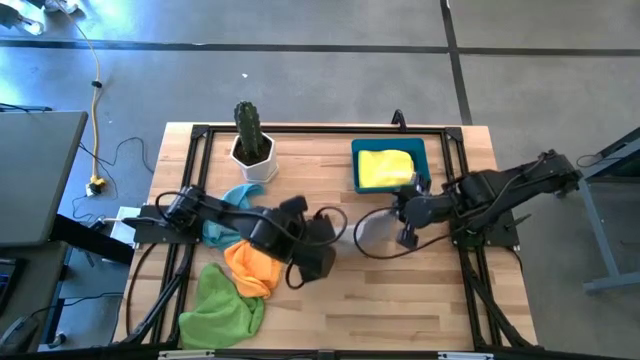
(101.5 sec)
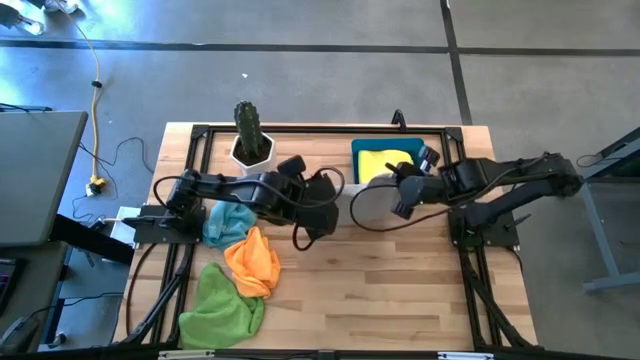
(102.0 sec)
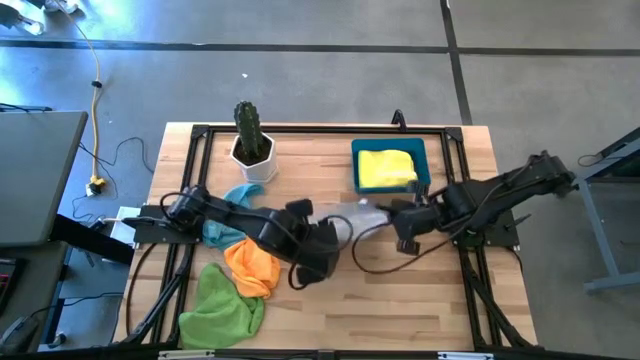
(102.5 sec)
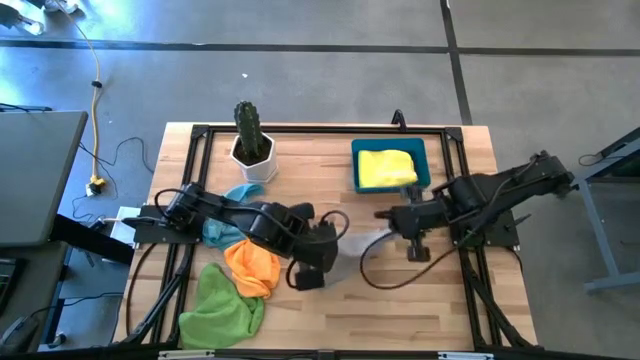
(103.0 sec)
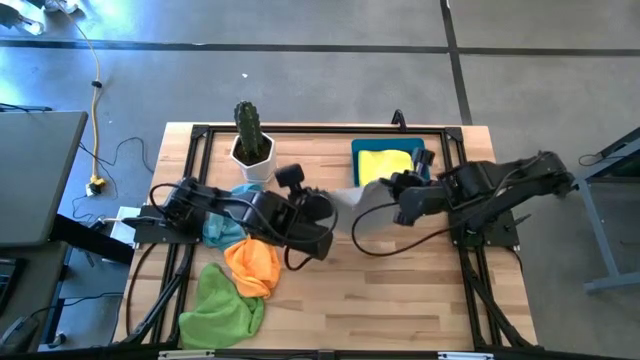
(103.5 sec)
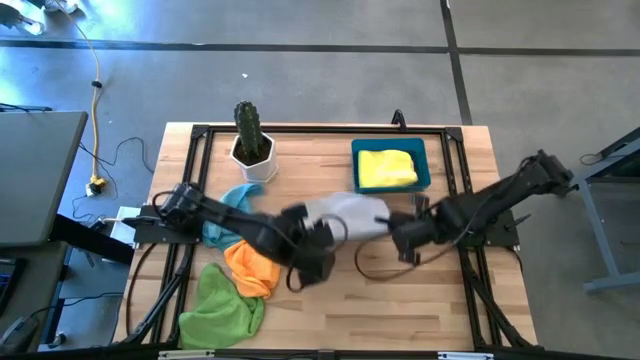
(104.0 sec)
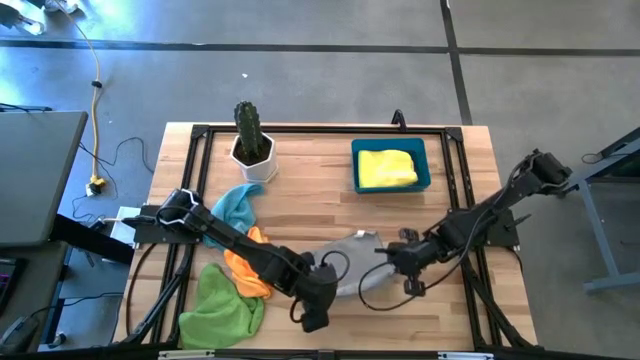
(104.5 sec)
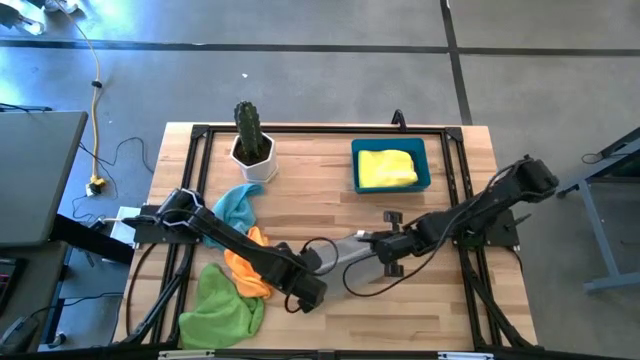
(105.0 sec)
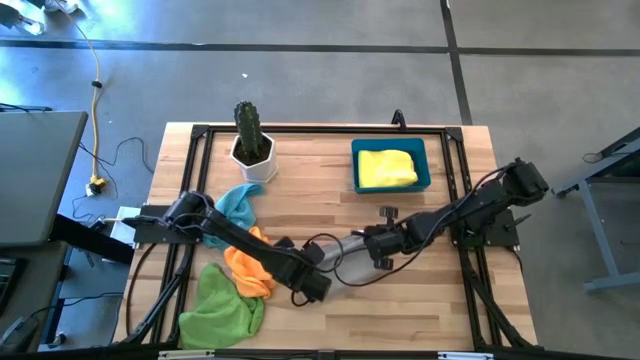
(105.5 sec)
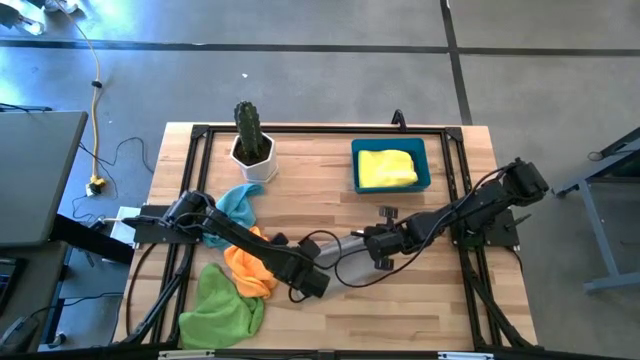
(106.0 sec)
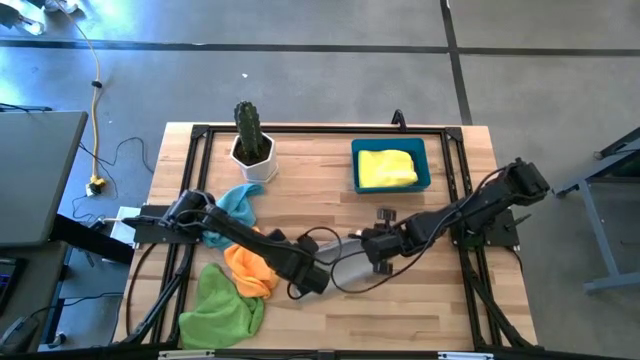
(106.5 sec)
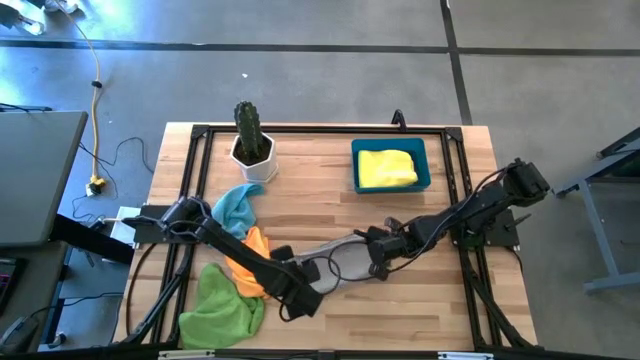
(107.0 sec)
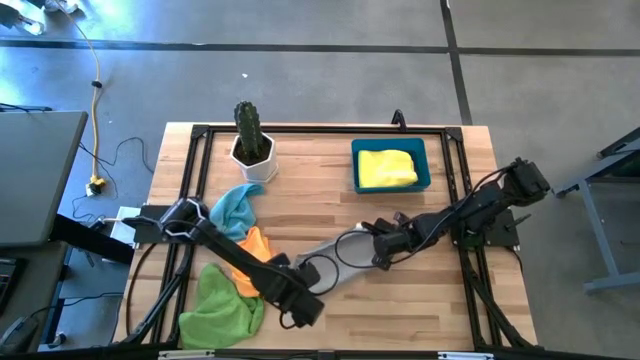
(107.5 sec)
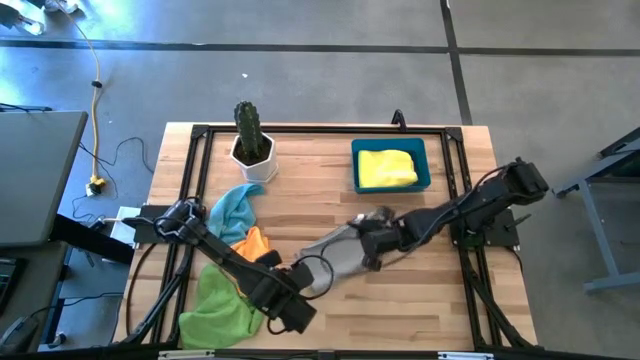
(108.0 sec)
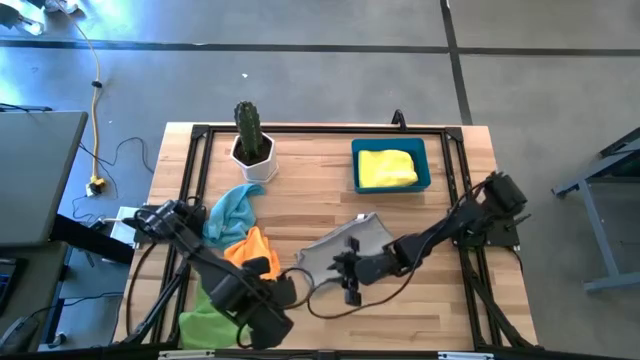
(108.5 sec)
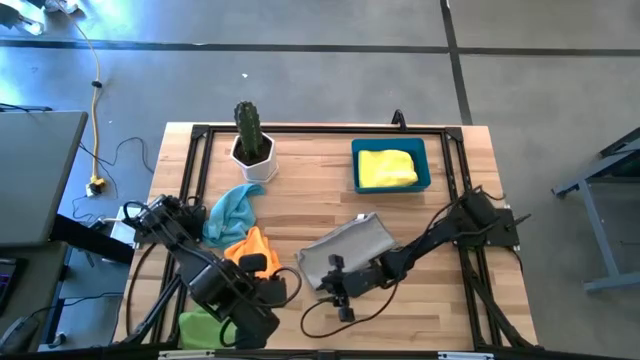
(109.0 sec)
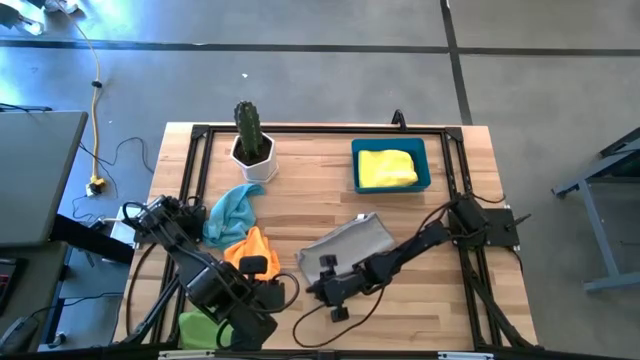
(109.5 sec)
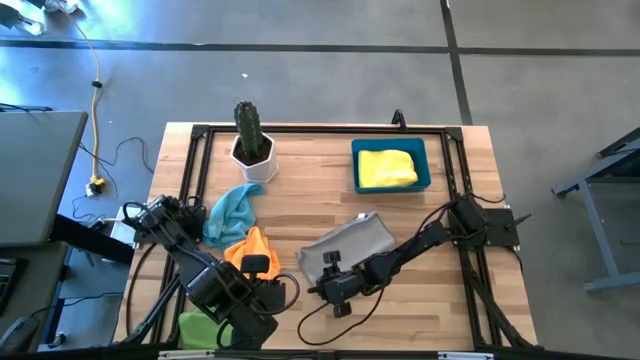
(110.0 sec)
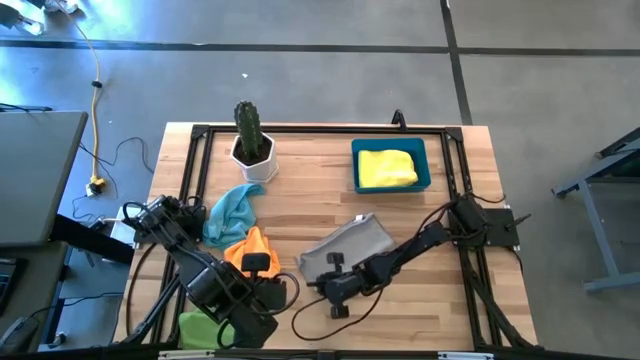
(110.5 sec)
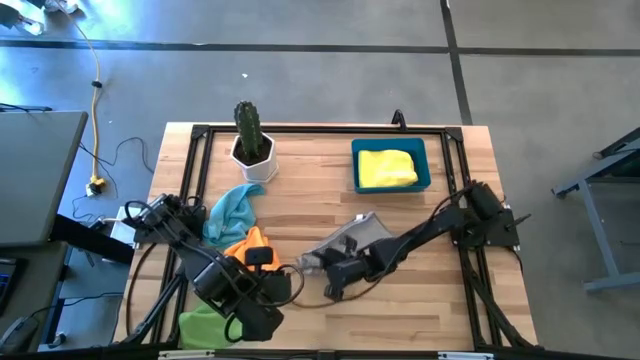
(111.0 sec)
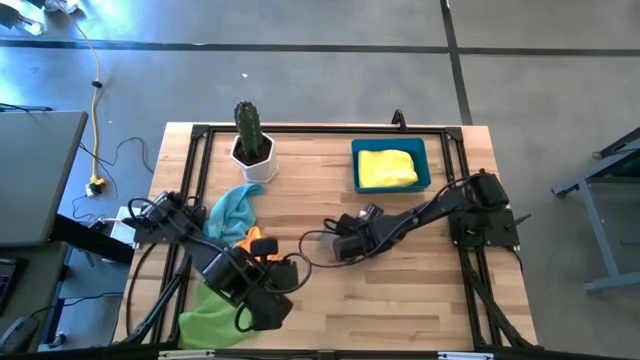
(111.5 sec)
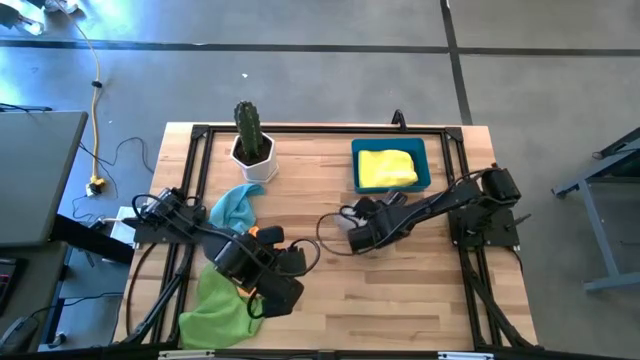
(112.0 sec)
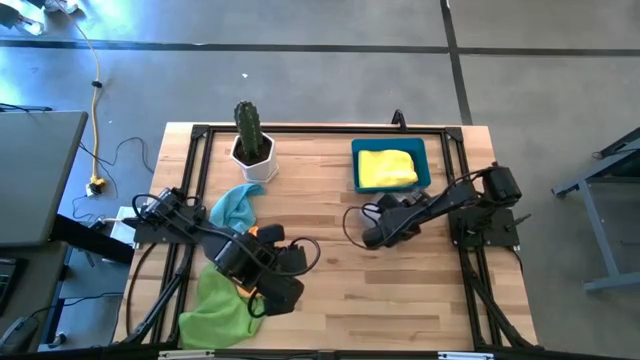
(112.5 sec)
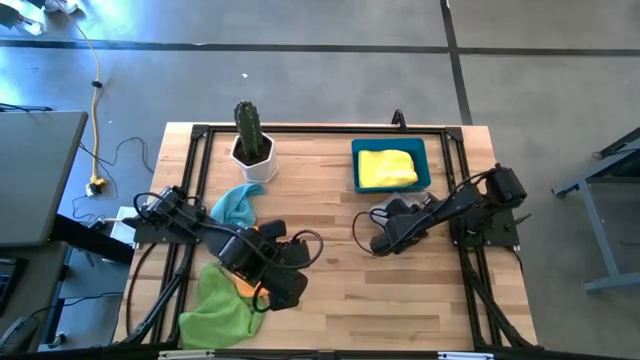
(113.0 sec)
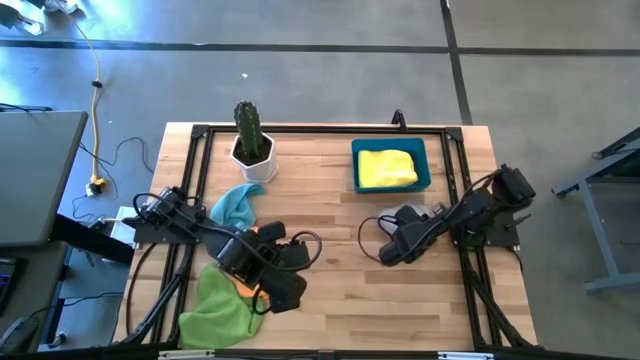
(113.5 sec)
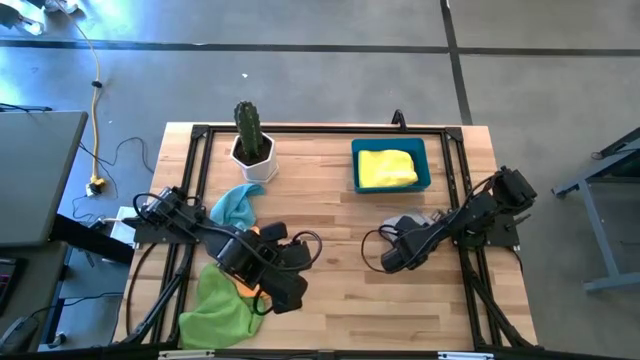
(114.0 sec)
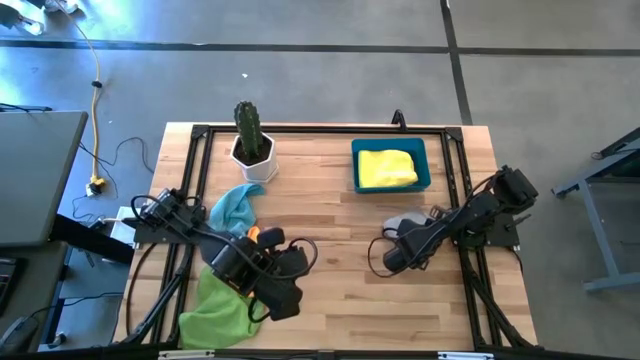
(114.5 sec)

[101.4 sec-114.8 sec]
Task: Fold microfiber towels
Fold the gray microfiber cloth

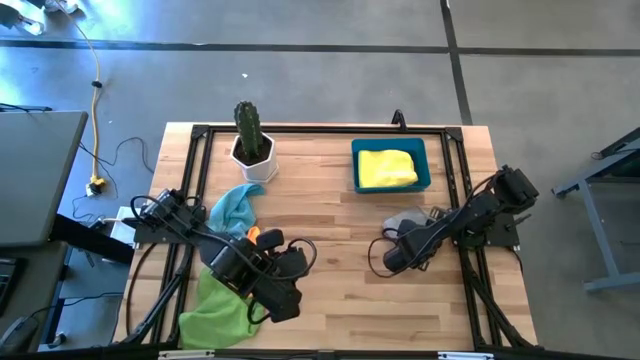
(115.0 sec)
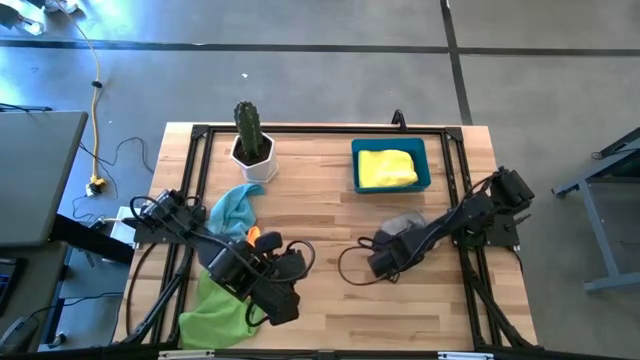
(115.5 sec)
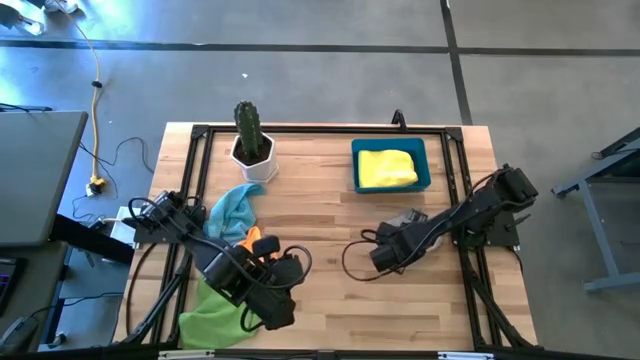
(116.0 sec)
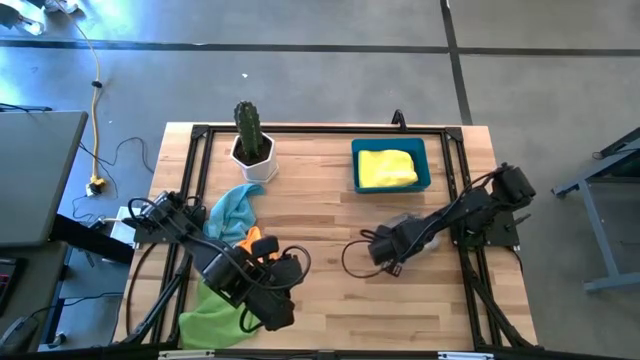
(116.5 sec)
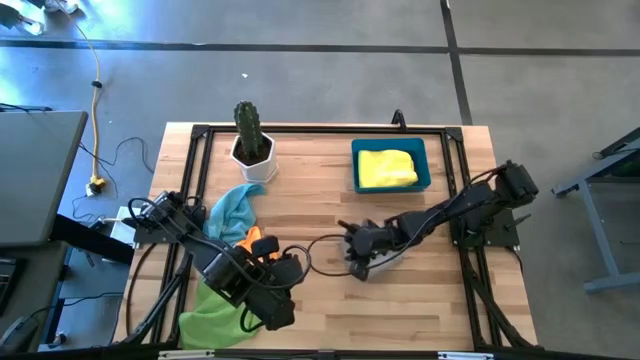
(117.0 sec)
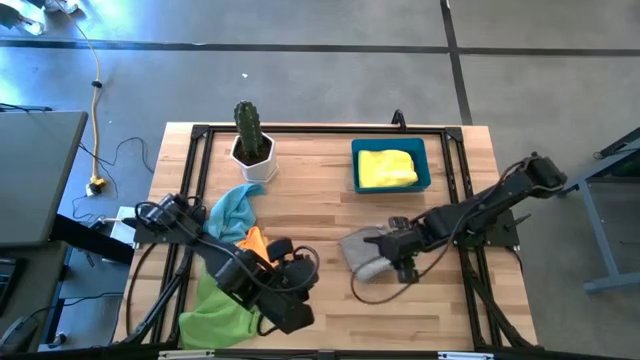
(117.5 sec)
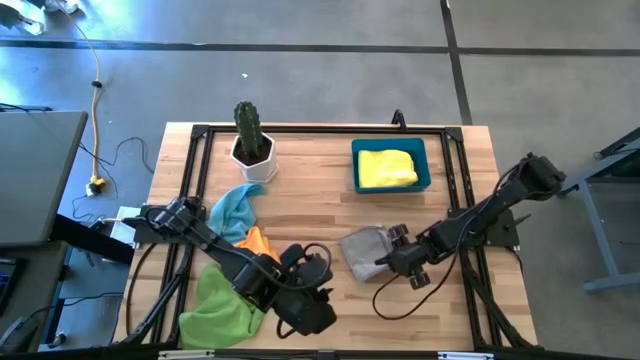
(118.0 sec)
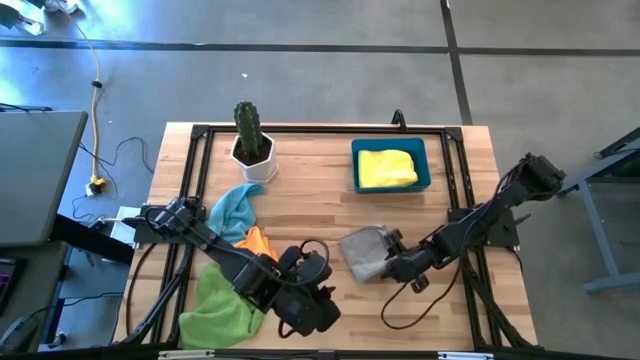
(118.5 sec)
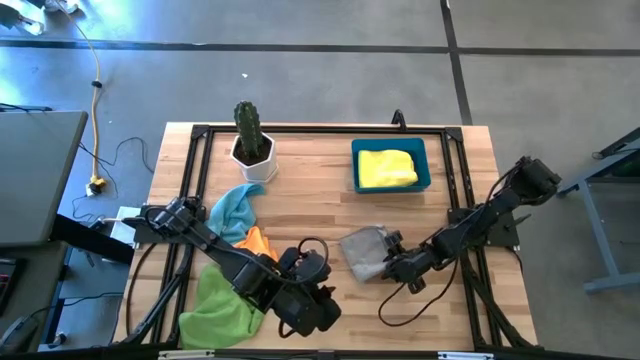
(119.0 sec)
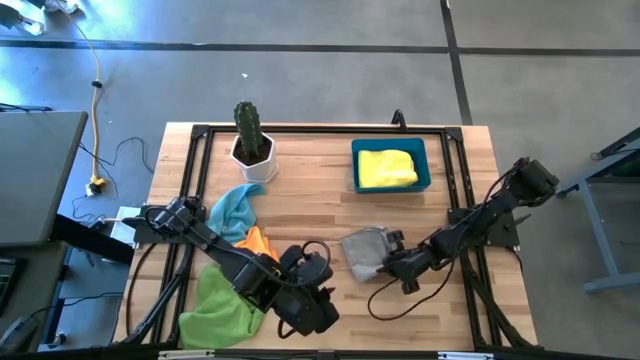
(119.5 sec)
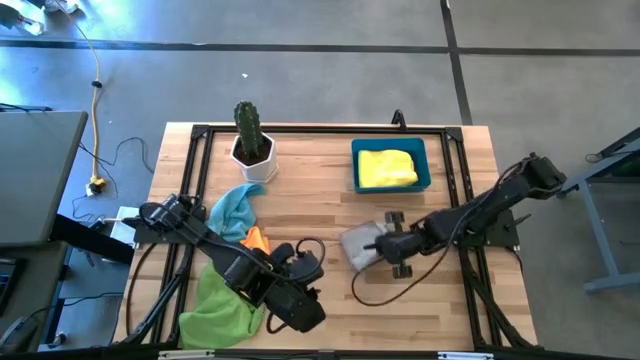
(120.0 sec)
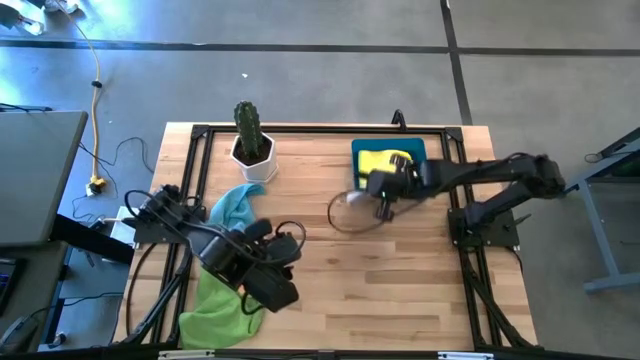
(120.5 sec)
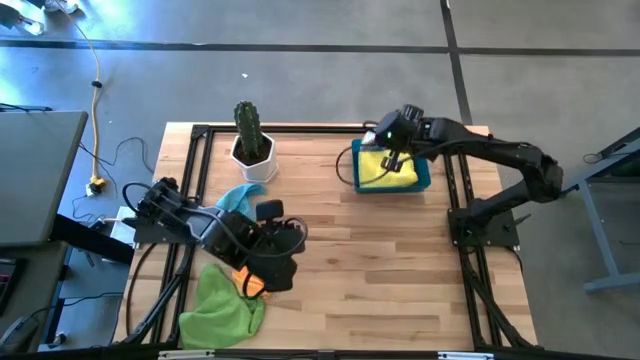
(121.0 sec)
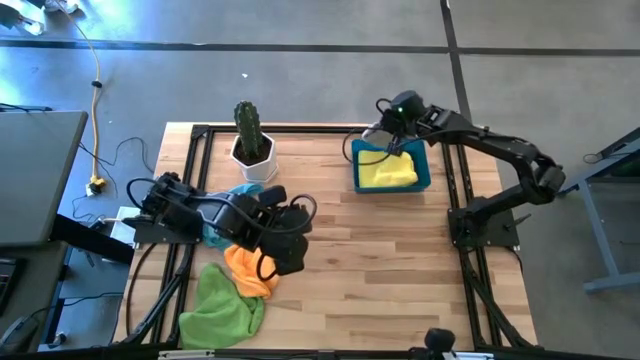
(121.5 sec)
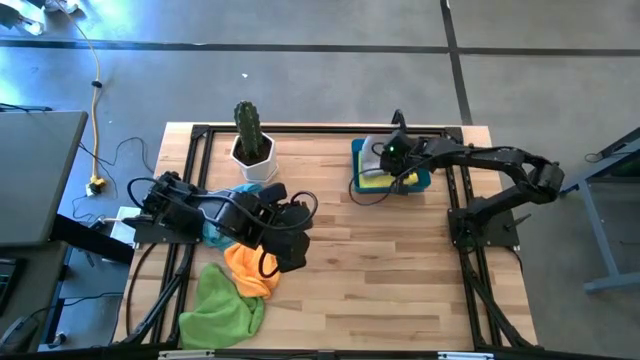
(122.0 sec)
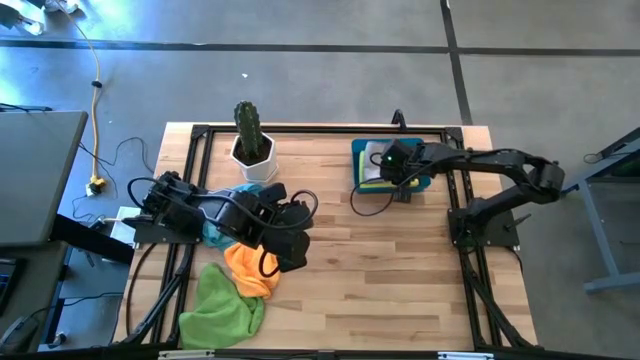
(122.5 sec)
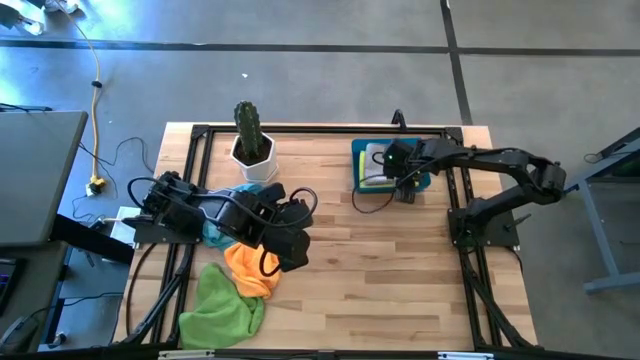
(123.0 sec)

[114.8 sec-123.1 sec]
Put the folded gray microfiber cloth into the blue bin
